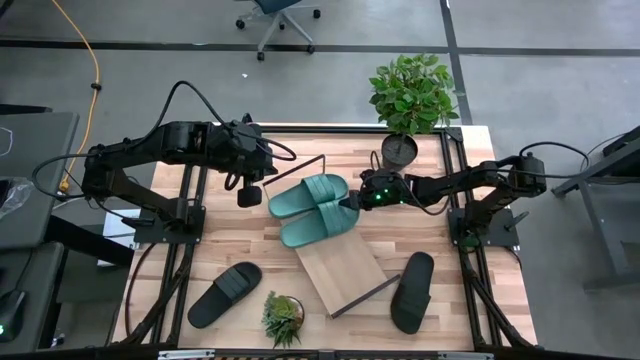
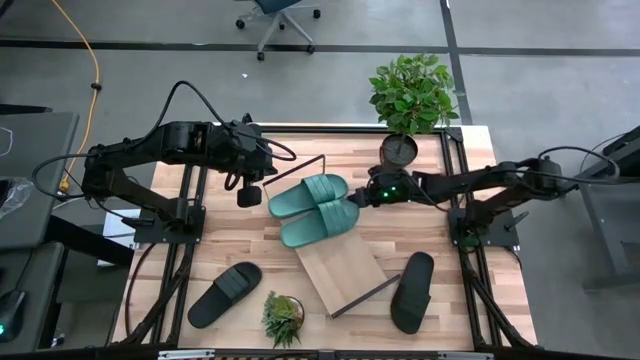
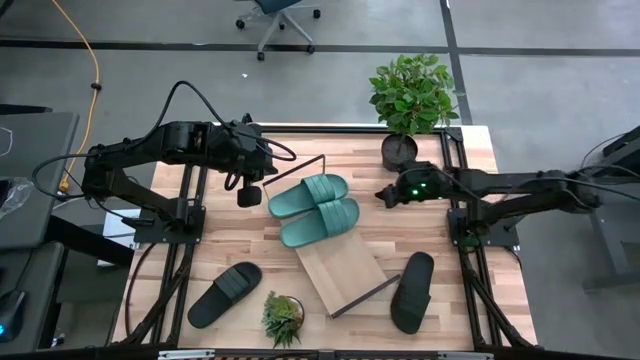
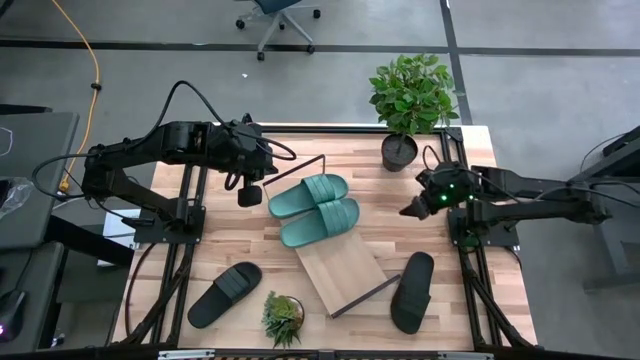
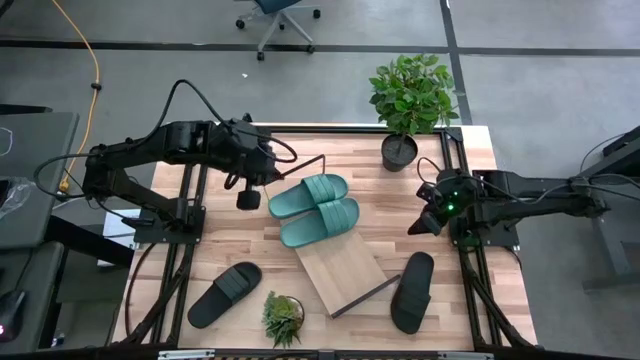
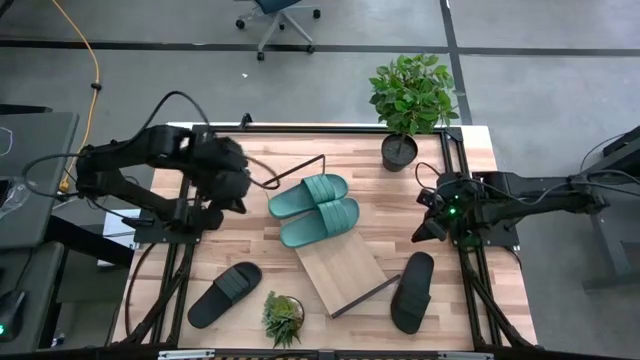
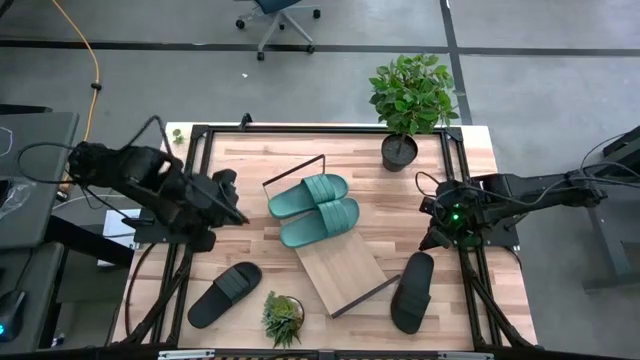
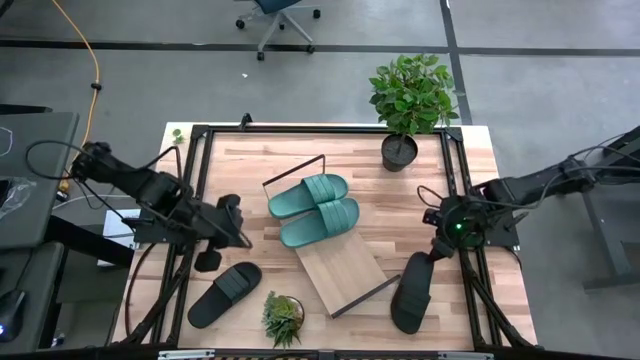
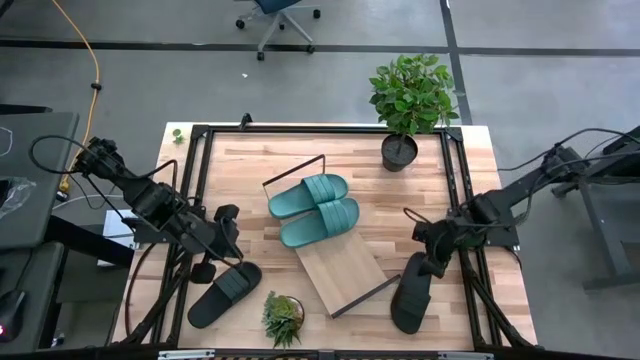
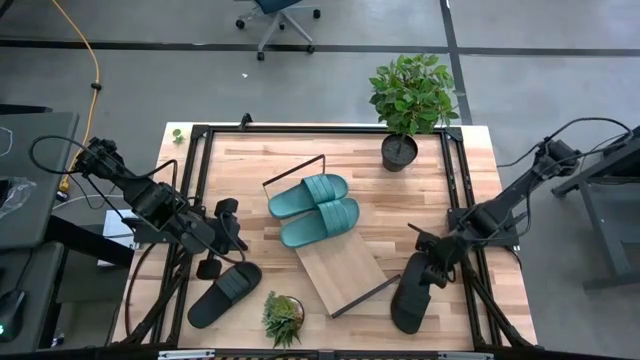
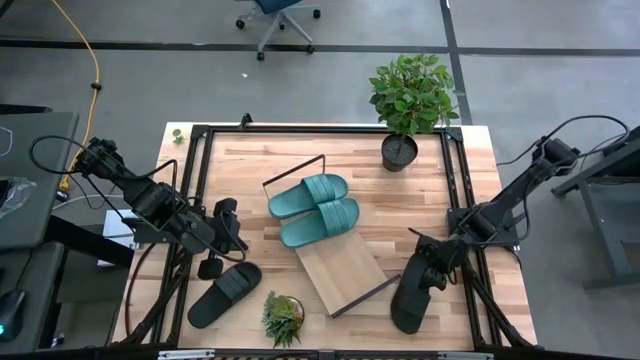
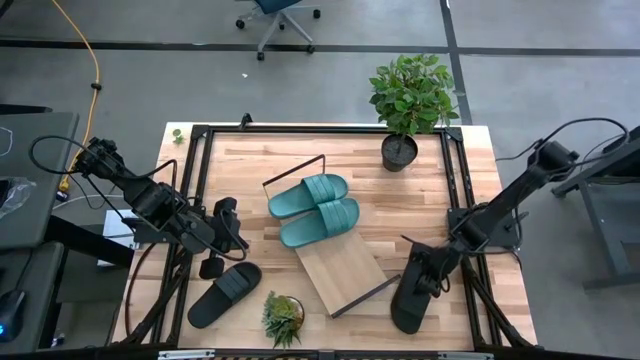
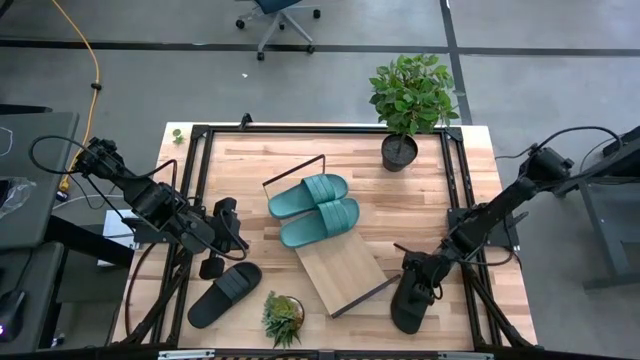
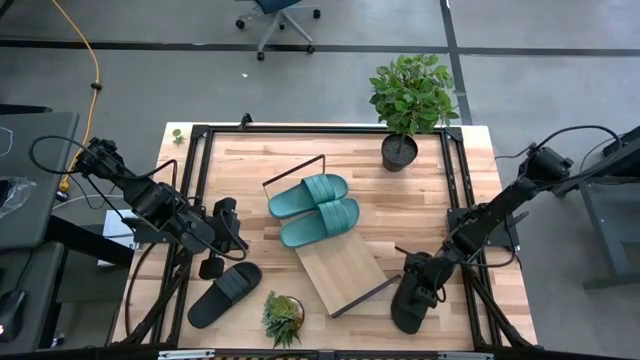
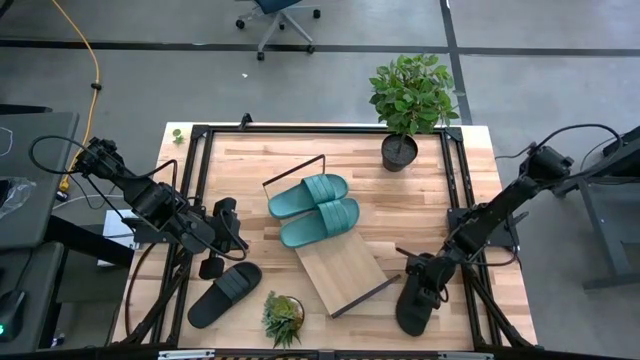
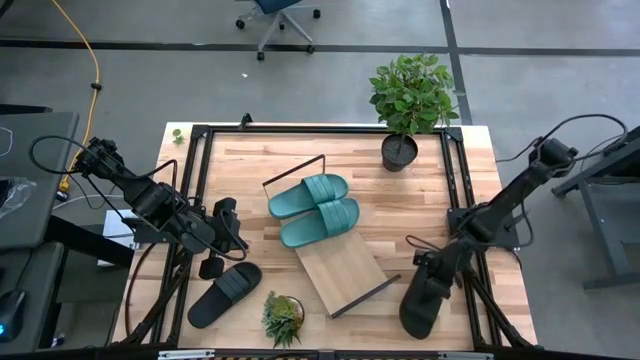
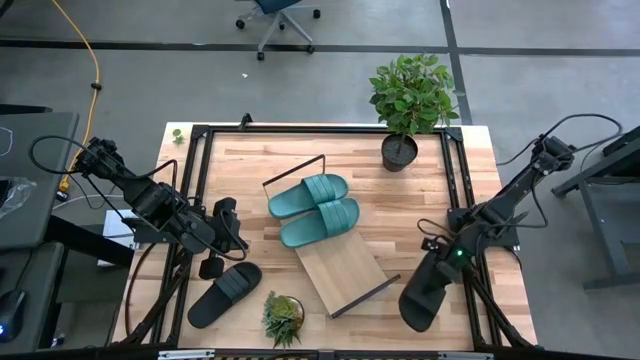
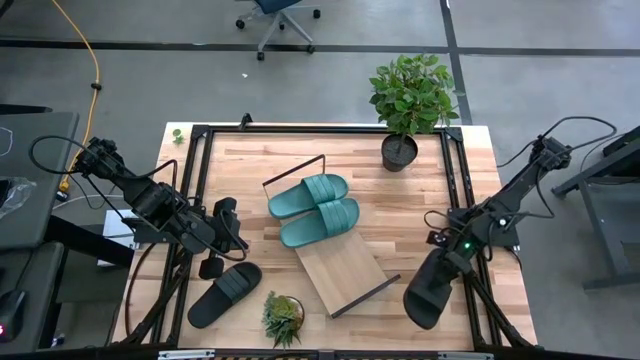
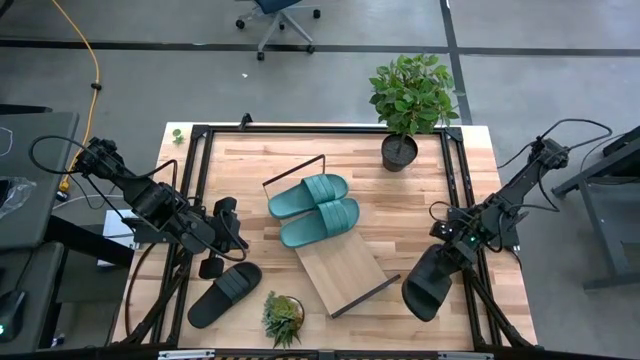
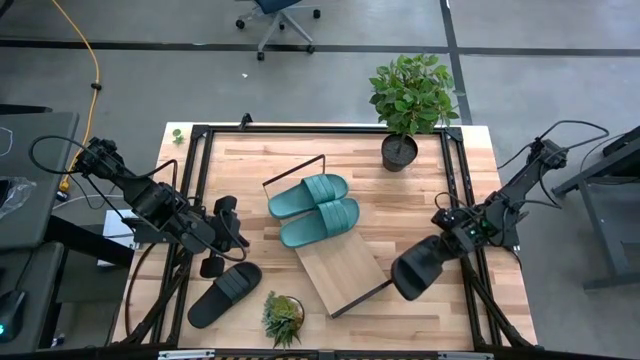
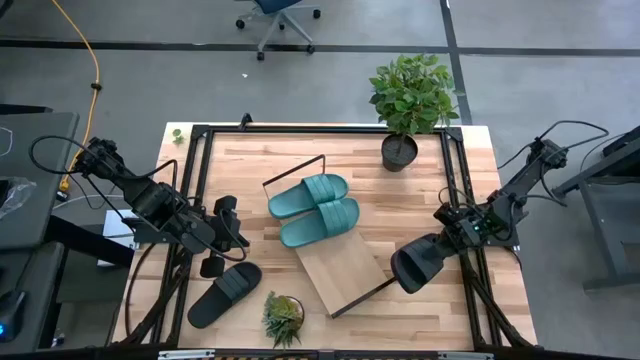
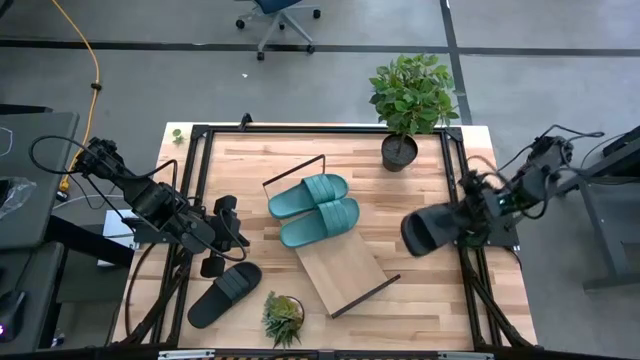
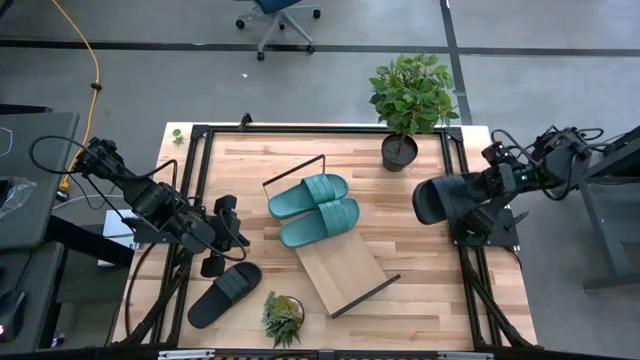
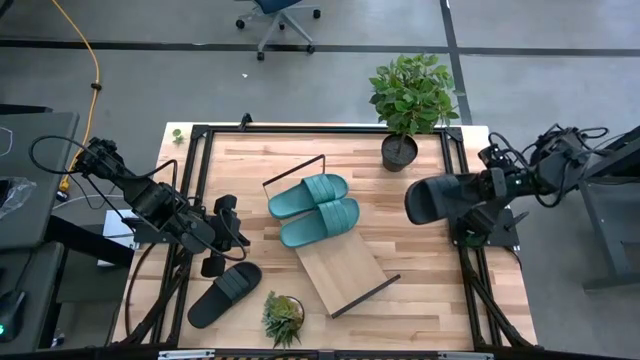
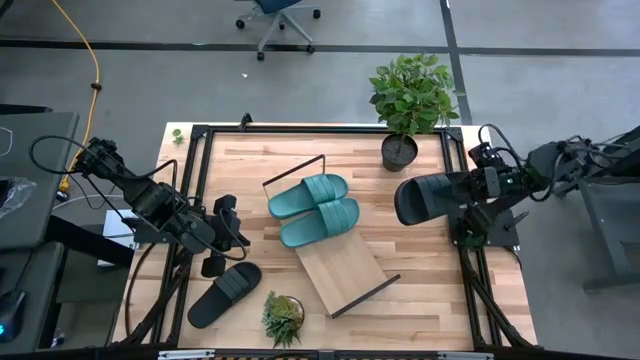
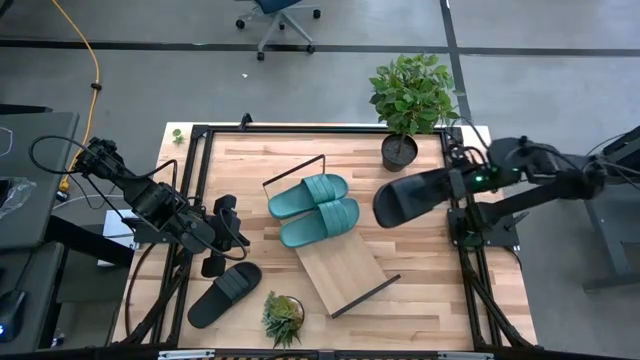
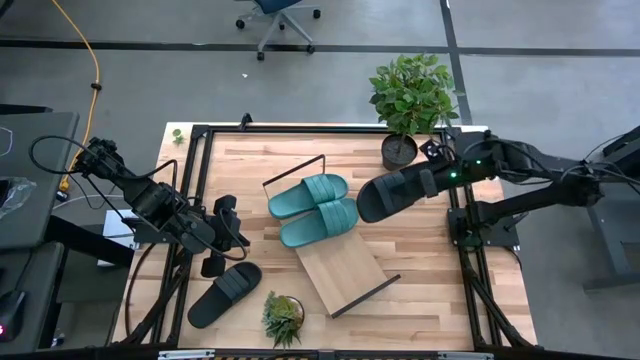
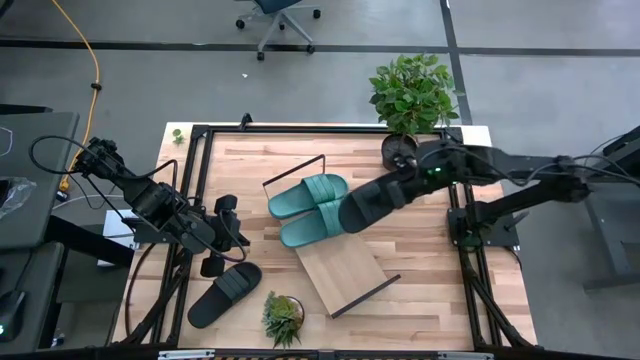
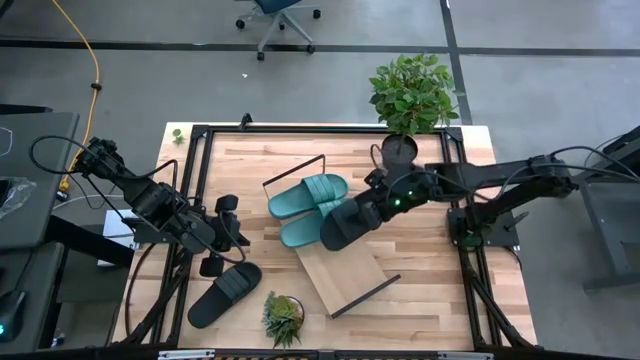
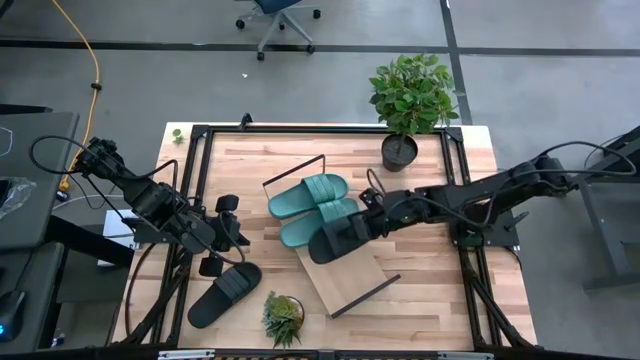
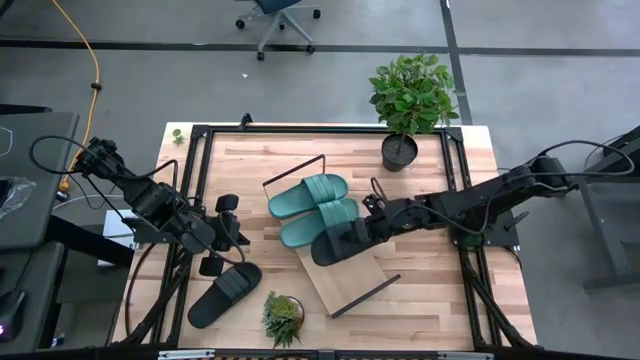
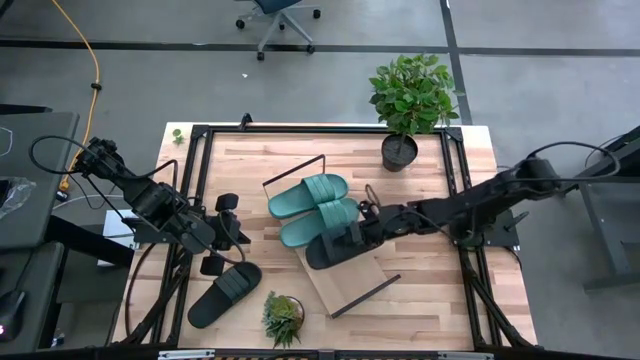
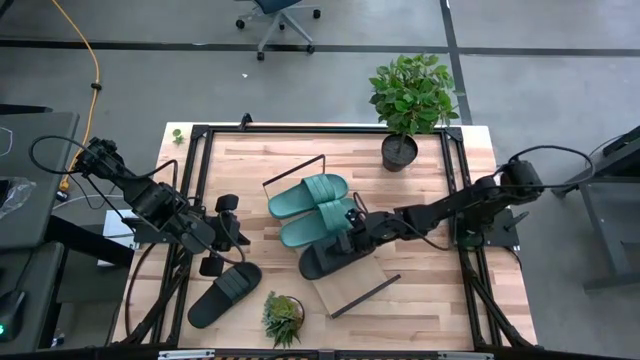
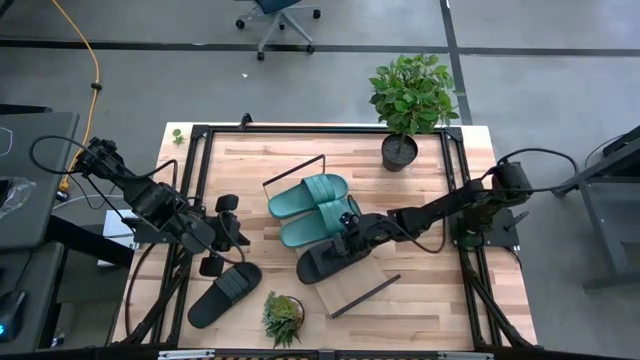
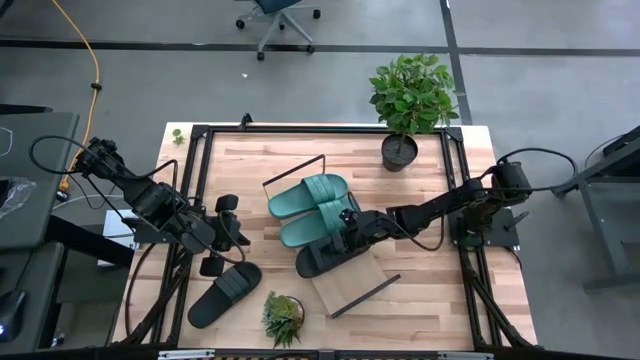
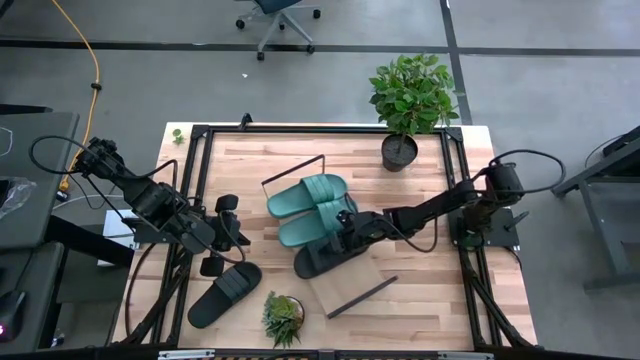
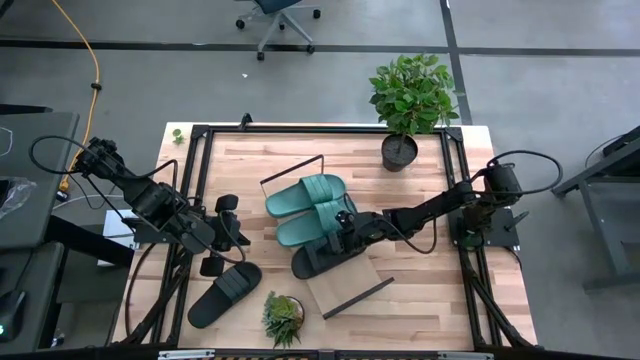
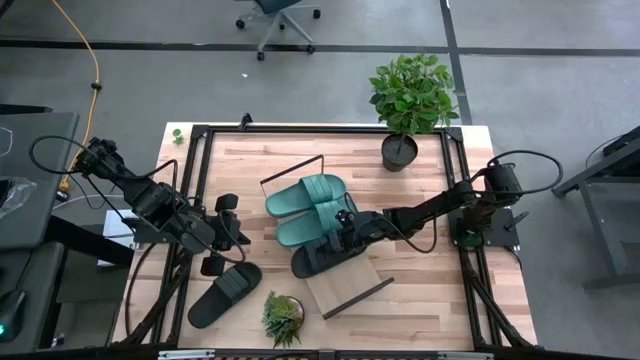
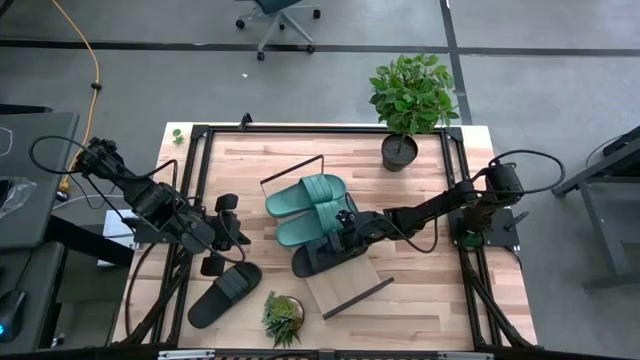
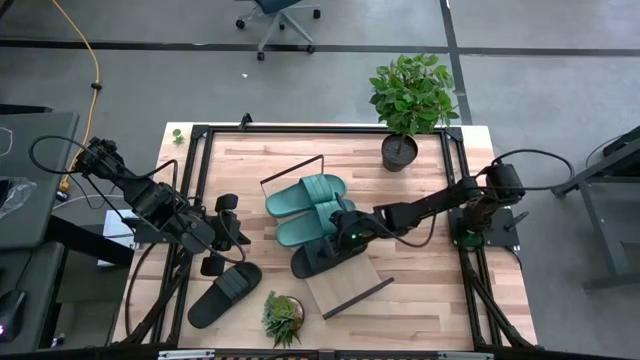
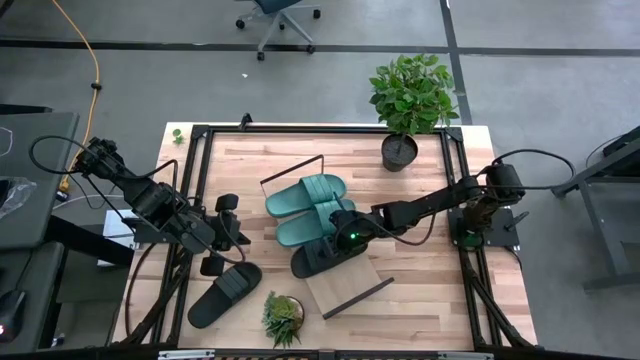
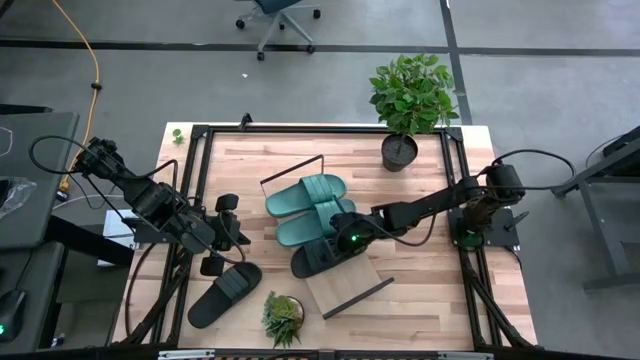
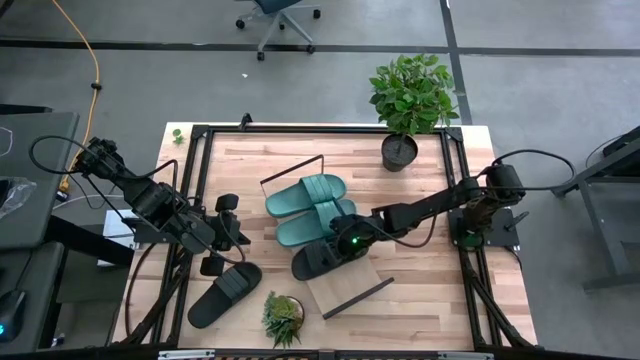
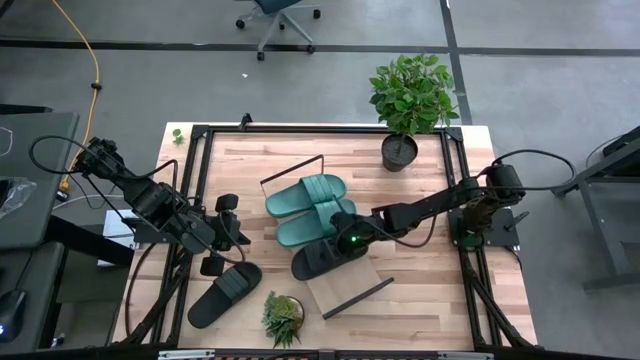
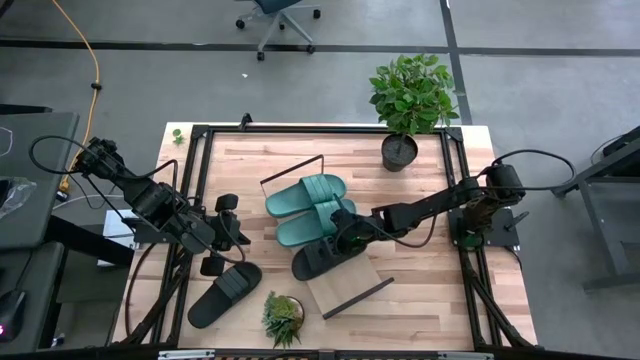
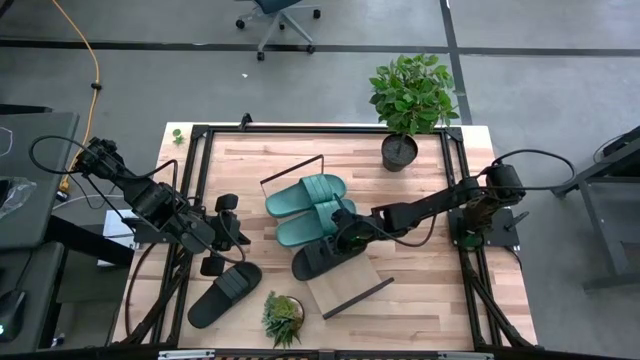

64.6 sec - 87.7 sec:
Task: Pick and place slides into the shelf
Put the right black slide on the shelf
